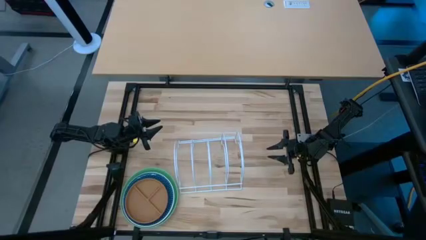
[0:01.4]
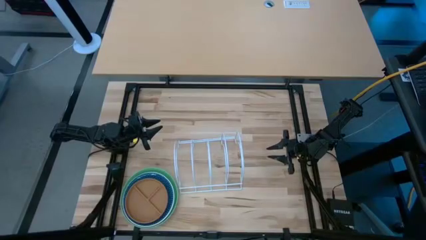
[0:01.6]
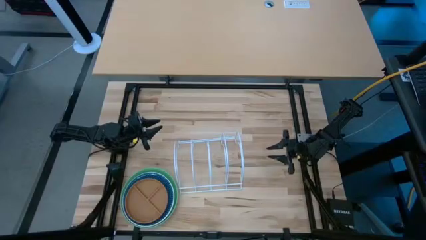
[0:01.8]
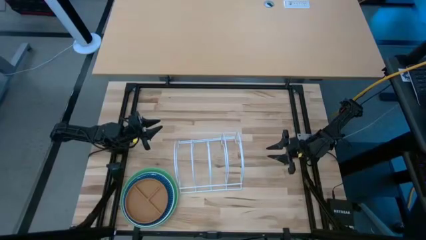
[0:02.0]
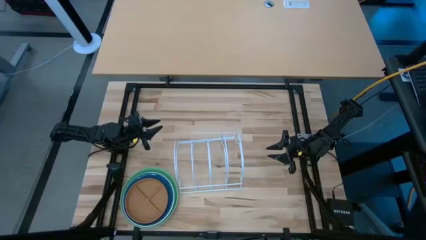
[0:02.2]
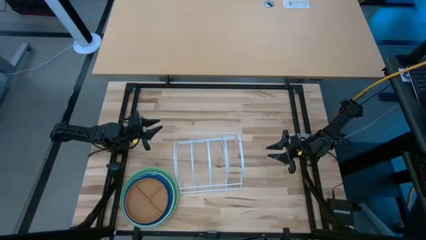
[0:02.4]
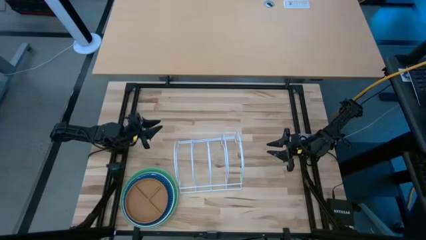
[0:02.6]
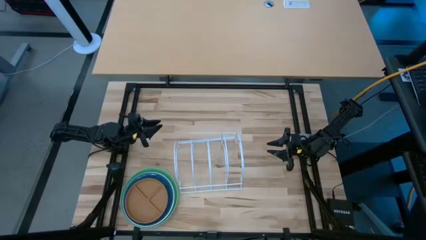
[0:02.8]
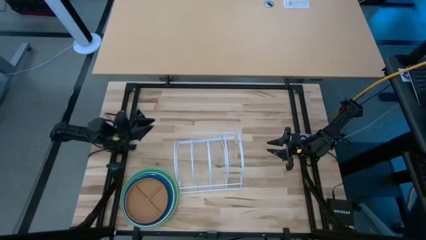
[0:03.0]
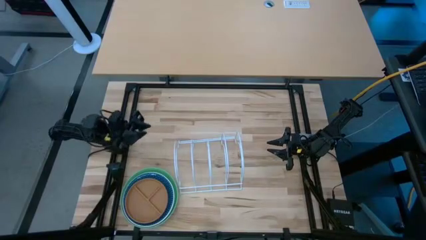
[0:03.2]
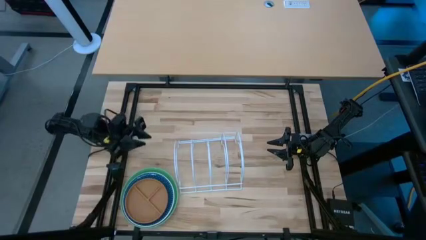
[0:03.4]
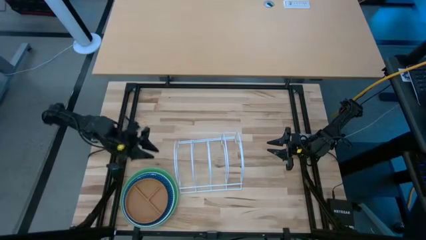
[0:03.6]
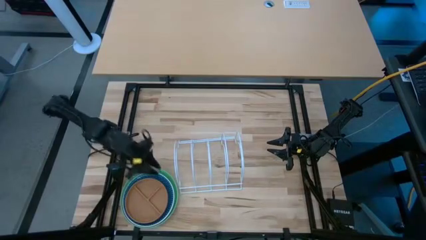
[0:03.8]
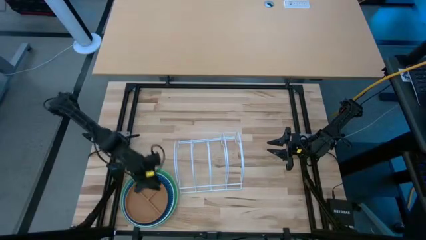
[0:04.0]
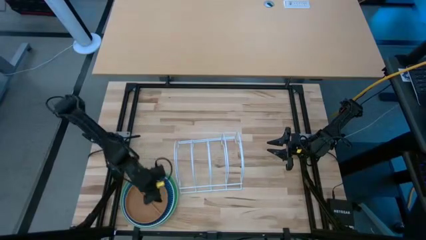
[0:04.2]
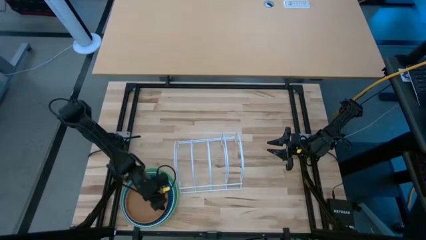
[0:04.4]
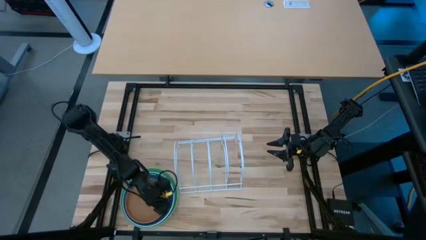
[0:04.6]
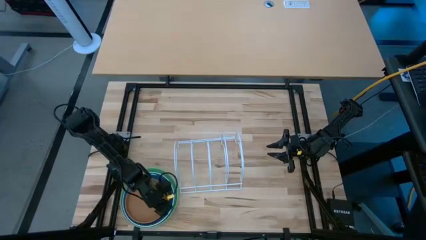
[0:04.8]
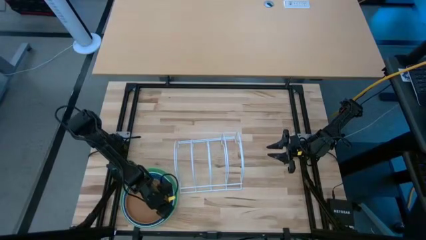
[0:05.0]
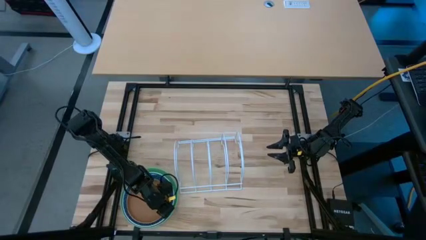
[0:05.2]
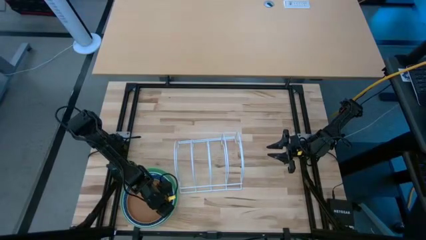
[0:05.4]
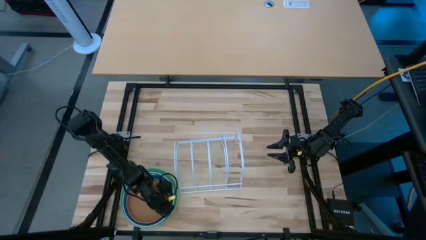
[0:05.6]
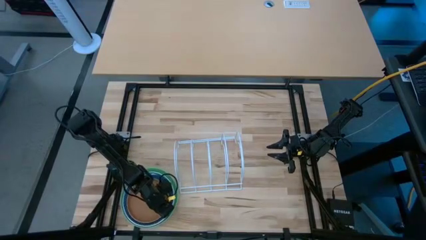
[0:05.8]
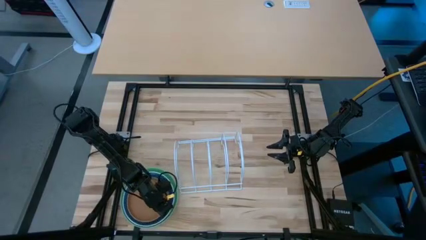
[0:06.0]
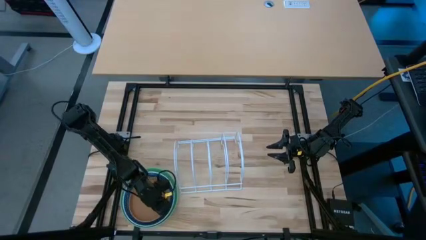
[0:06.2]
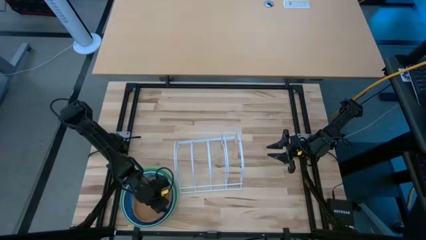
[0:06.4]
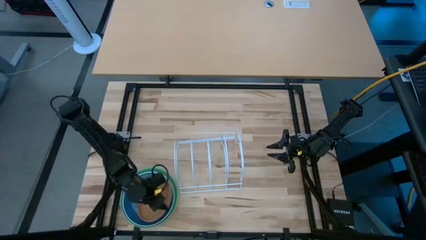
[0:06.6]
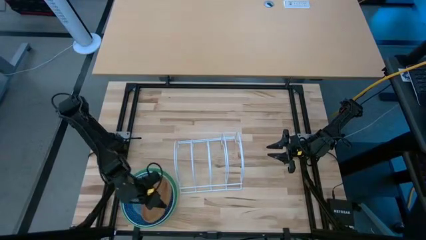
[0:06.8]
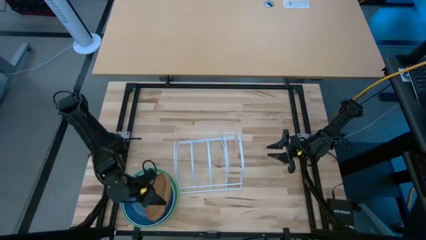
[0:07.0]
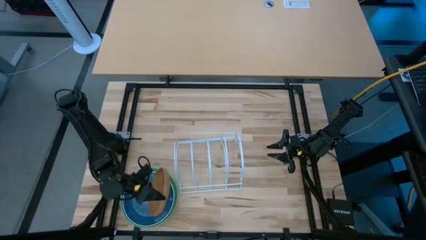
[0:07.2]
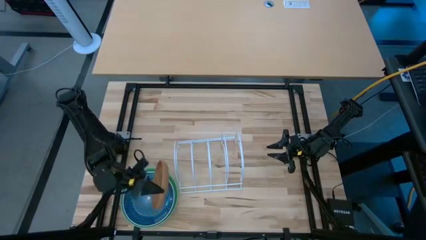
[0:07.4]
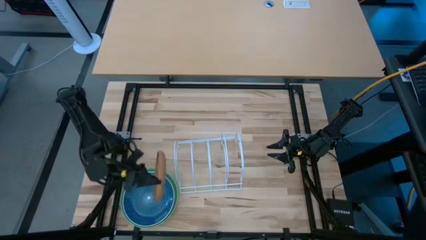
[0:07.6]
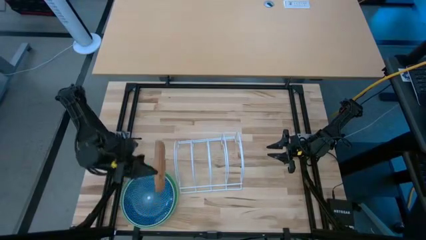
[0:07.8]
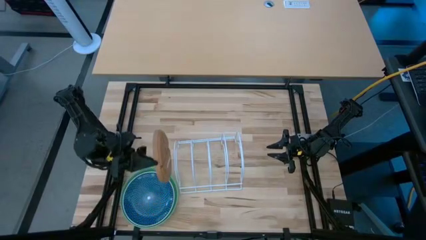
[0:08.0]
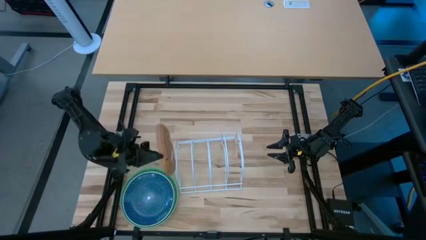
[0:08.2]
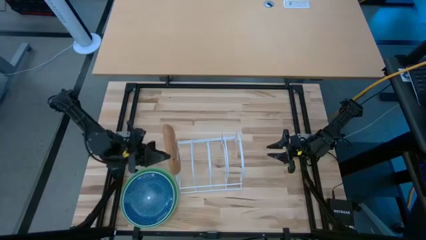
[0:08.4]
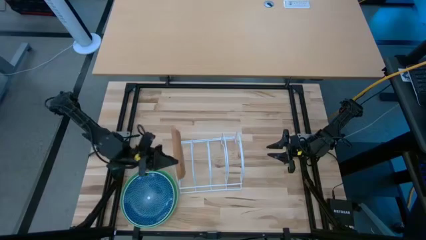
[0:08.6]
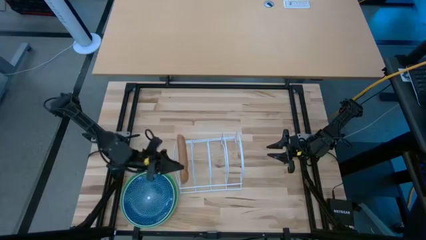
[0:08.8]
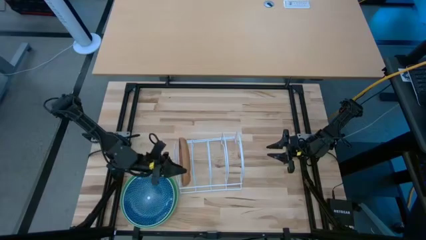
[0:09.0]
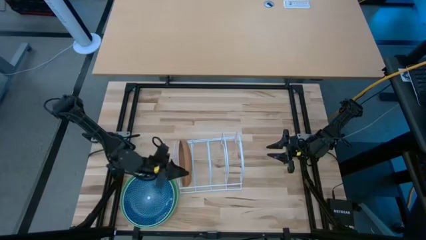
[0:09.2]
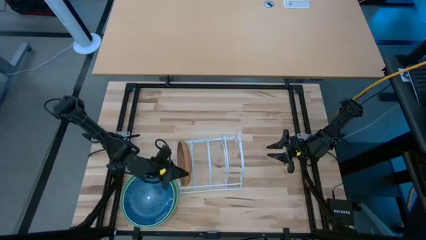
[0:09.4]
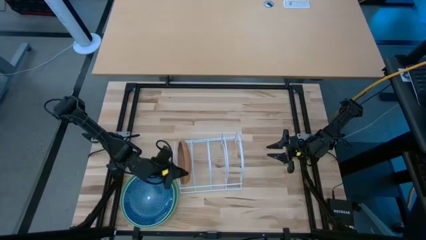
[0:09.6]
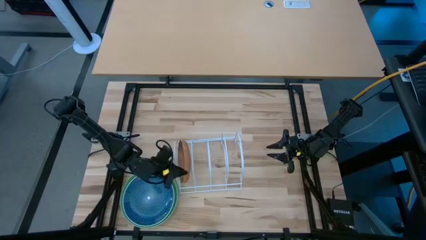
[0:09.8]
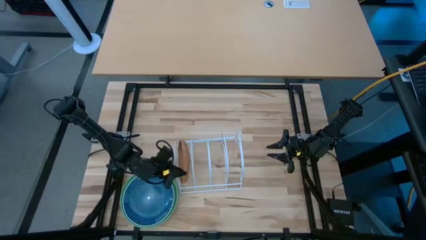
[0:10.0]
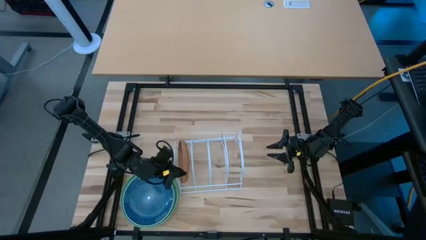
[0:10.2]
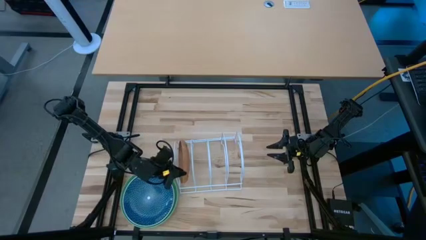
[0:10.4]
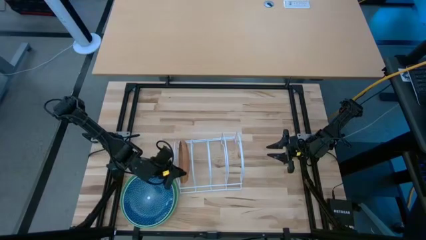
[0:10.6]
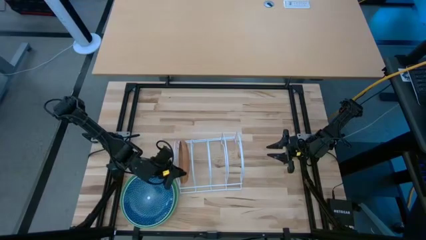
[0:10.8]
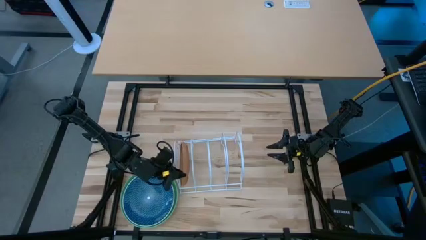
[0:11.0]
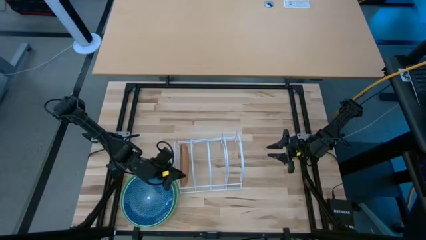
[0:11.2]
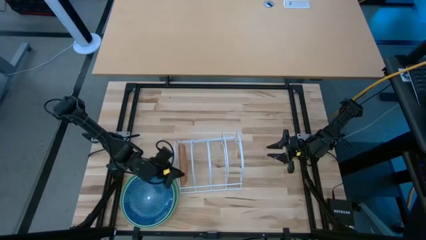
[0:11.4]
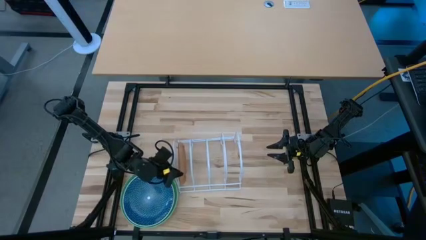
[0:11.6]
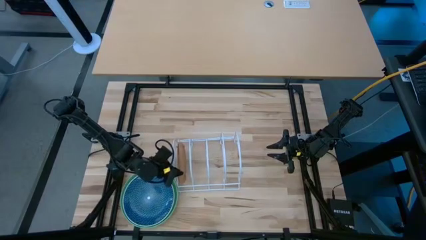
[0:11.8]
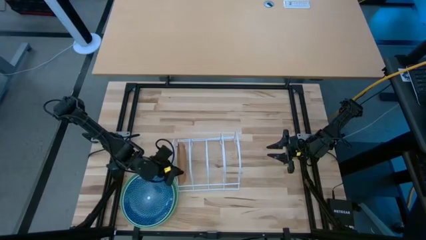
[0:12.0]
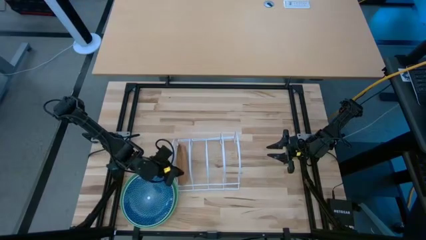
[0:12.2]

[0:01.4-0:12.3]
Task: Sort dishes
Put the brown plate into the dish rack
